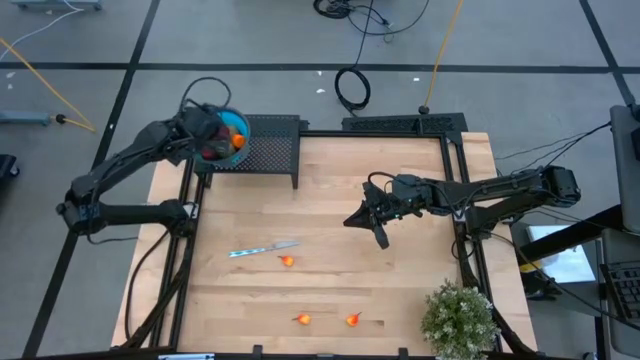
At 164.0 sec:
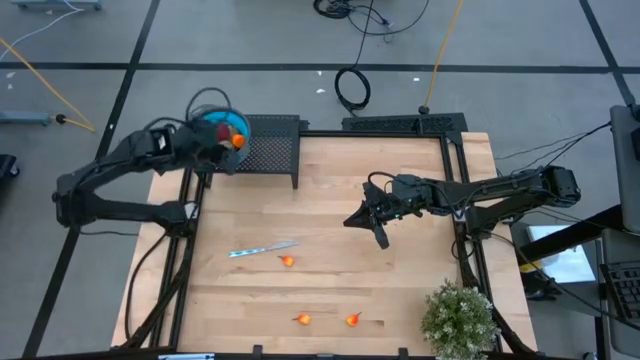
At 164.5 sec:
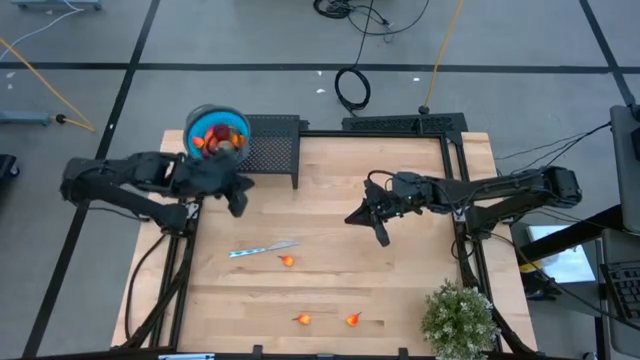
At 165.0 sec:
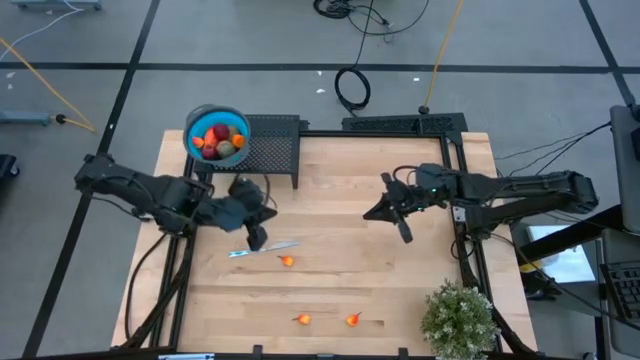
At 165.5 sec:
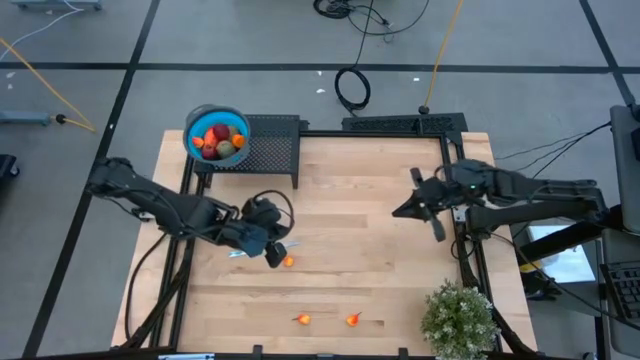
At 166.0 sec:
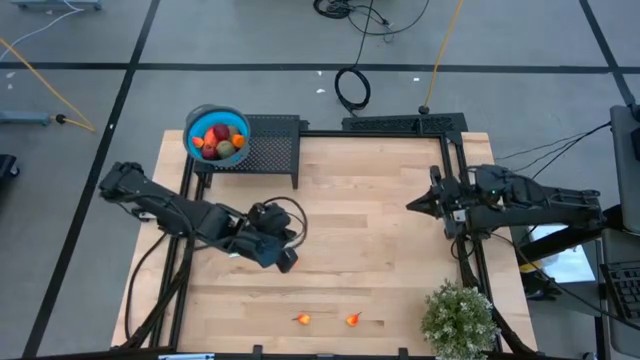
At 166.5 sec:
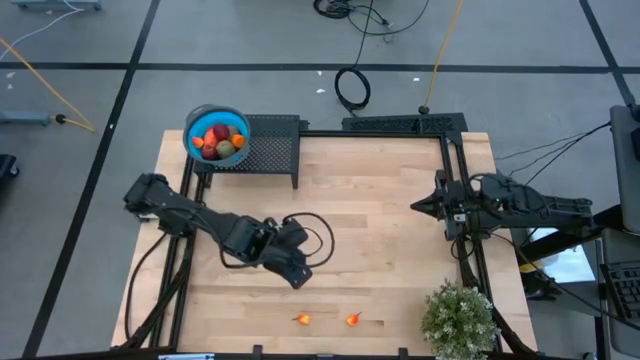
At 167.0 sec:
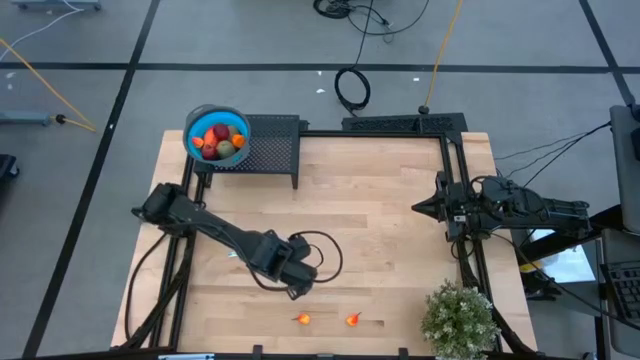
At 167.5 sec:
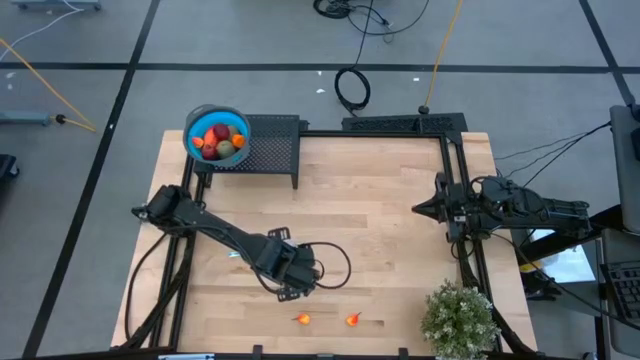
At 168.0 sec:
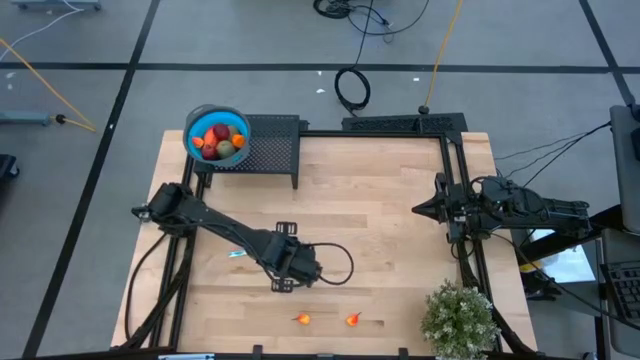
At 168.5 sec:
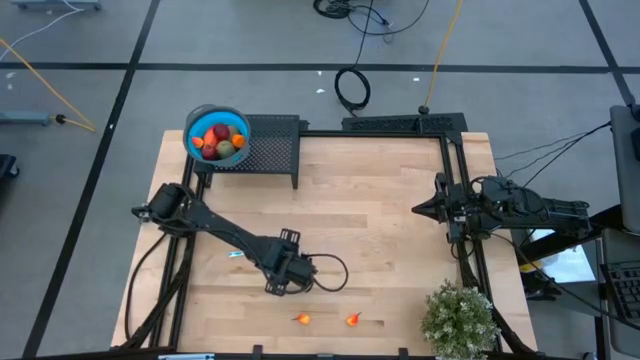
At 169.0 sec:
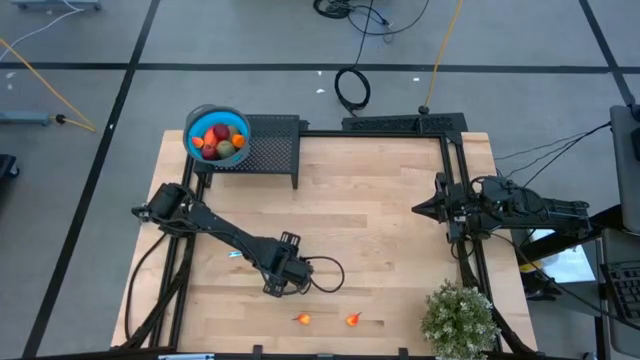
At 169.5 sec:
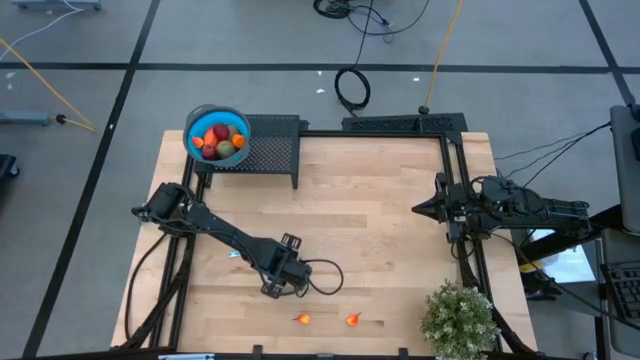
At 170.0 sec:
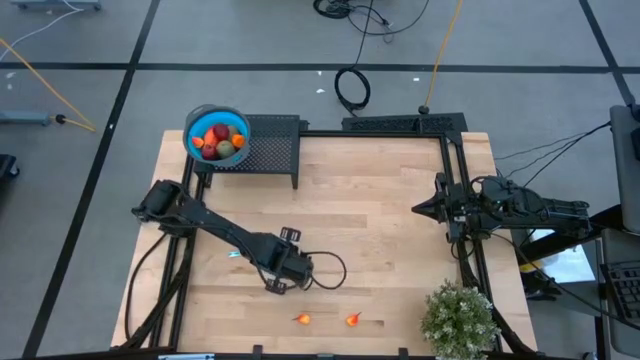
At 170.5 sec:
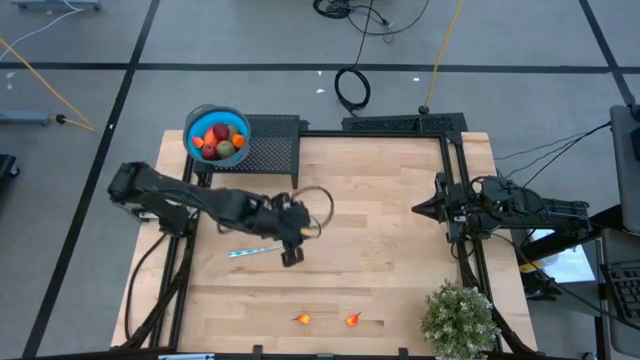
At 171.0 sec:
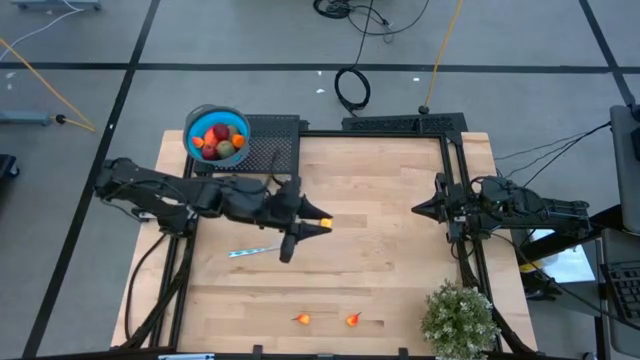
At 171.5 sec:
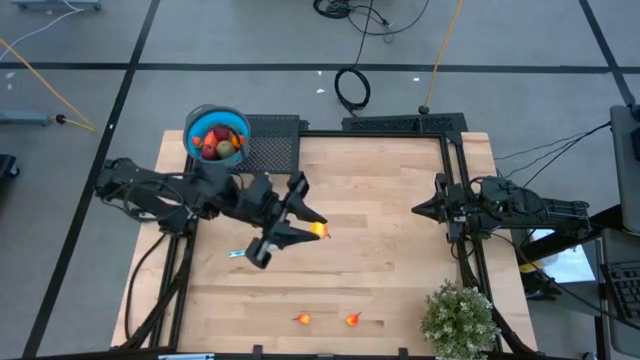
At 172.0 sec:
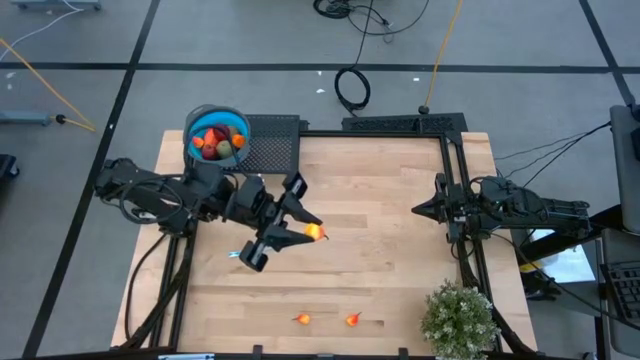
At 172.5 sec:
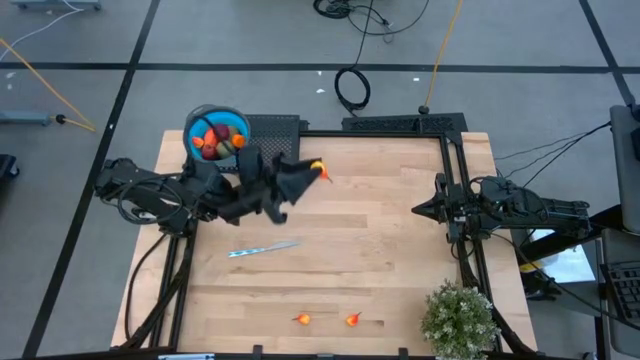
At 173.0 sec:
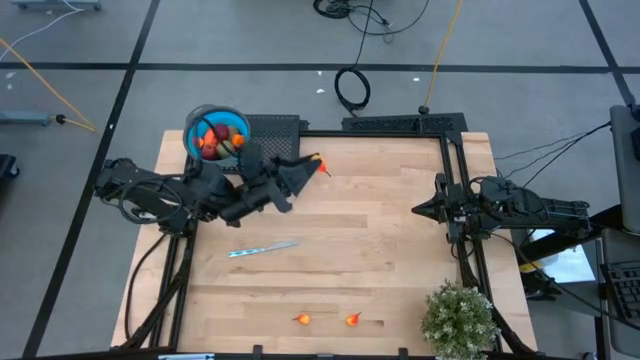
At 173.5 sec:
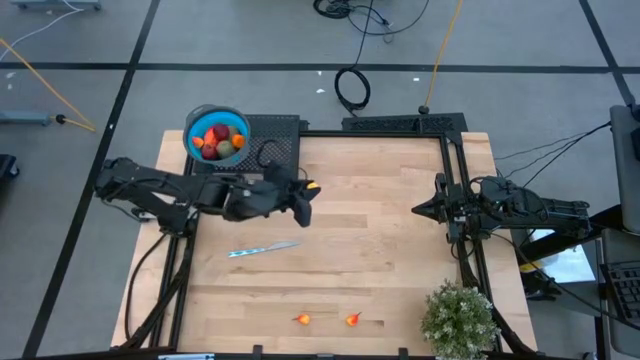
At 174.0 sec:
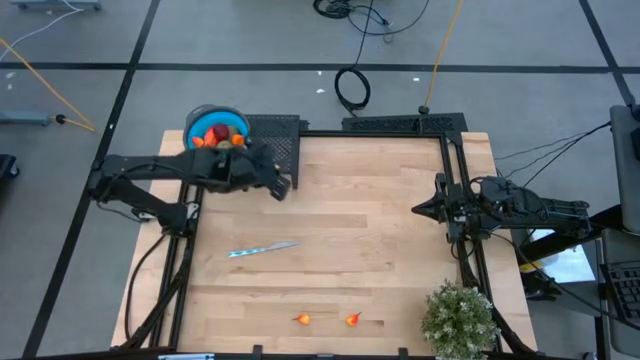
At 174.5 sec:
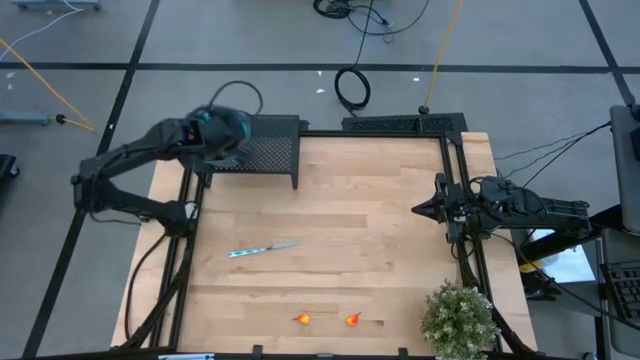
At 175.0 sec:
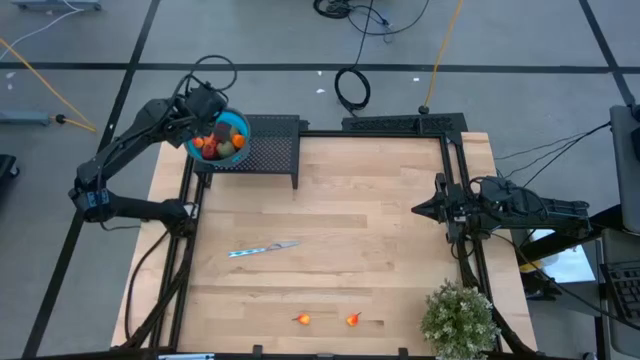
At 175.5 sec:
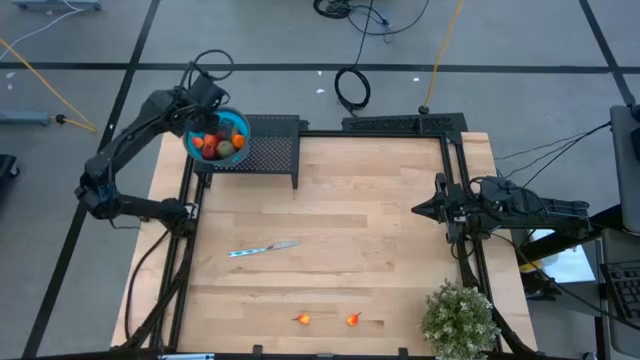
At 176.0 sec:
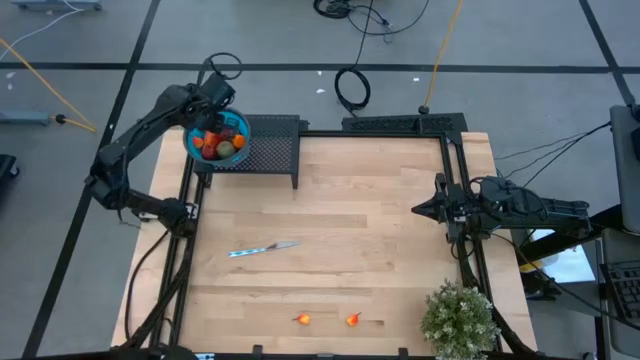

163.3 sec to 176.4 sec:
Task: Pick & Place Fruit
Put the peach into the blue strainer bowl on the shelf

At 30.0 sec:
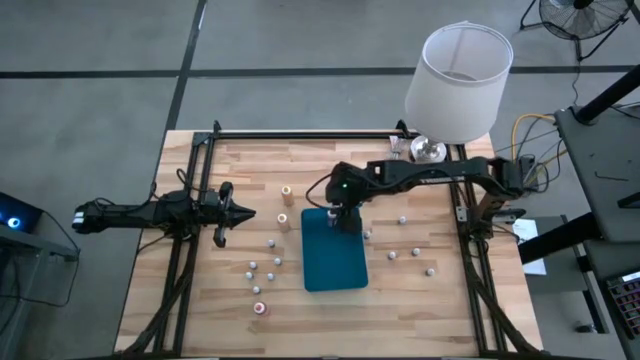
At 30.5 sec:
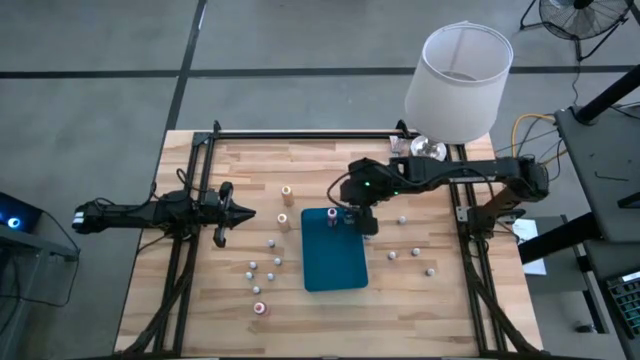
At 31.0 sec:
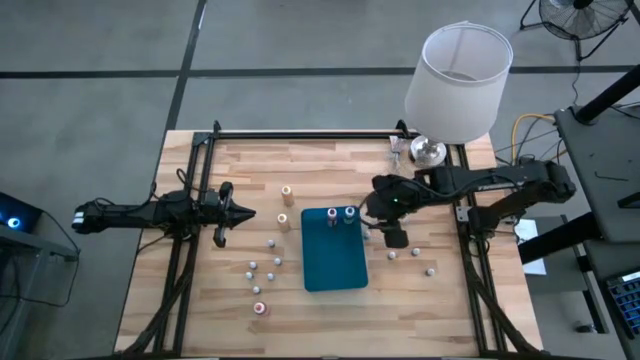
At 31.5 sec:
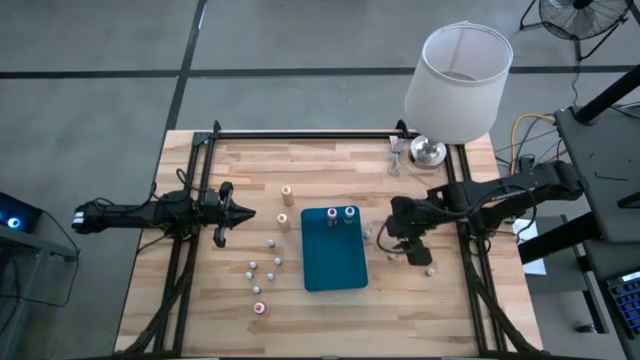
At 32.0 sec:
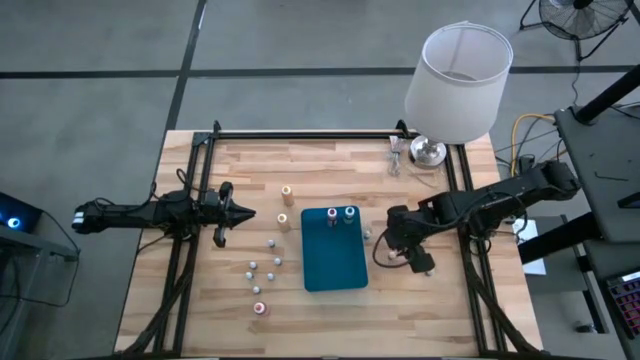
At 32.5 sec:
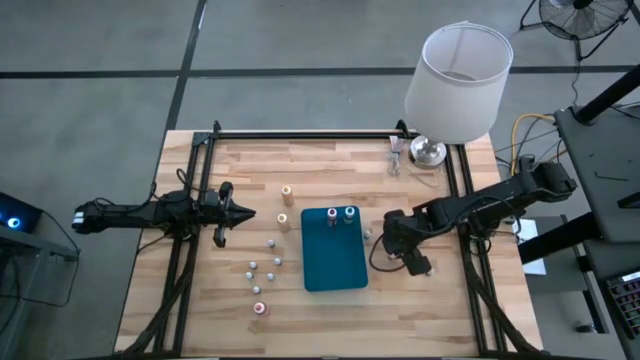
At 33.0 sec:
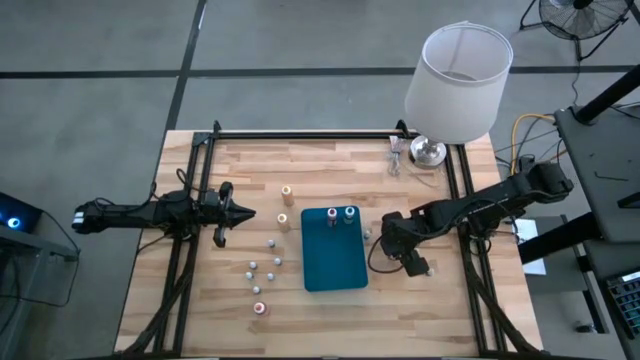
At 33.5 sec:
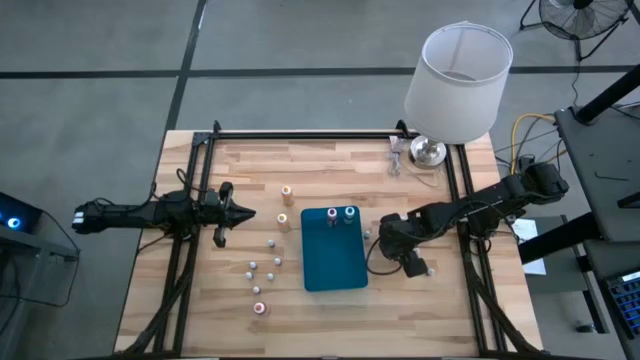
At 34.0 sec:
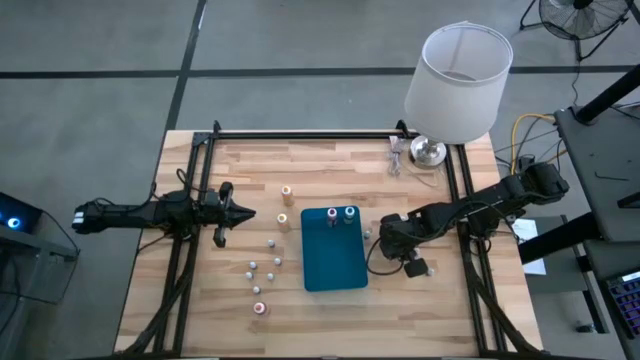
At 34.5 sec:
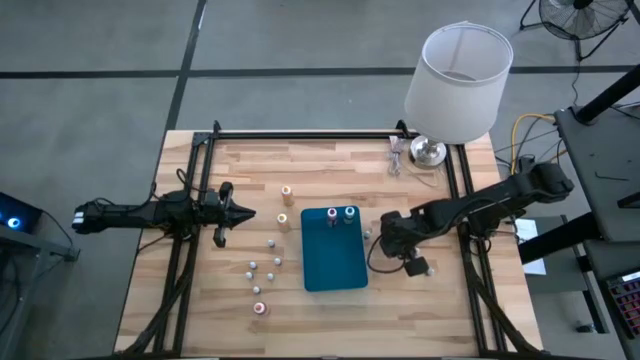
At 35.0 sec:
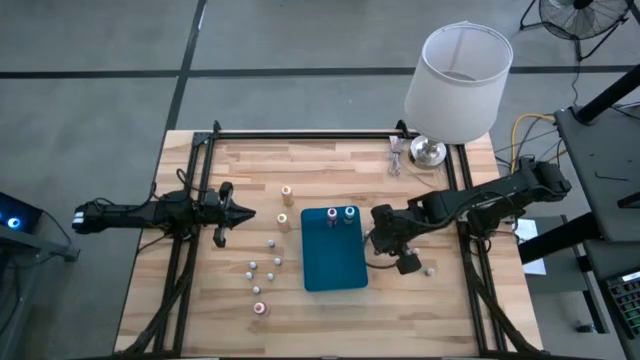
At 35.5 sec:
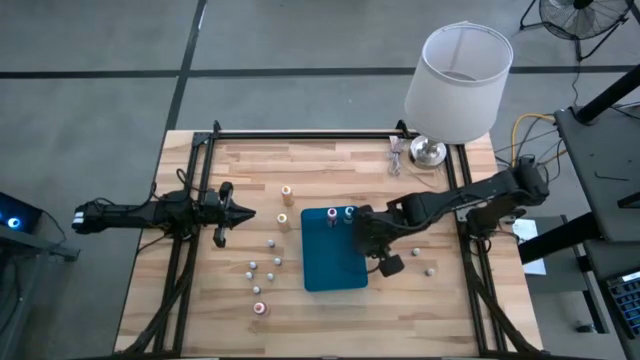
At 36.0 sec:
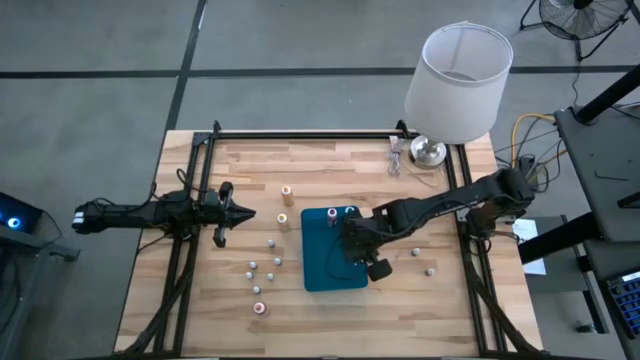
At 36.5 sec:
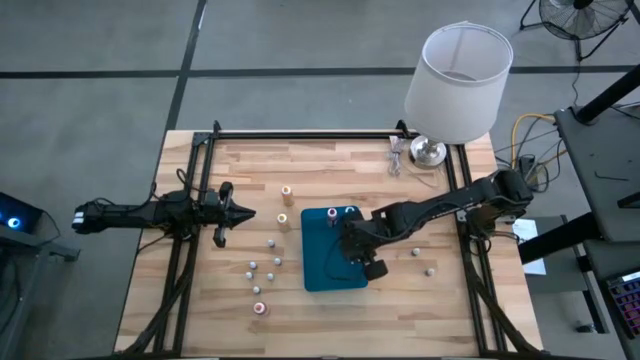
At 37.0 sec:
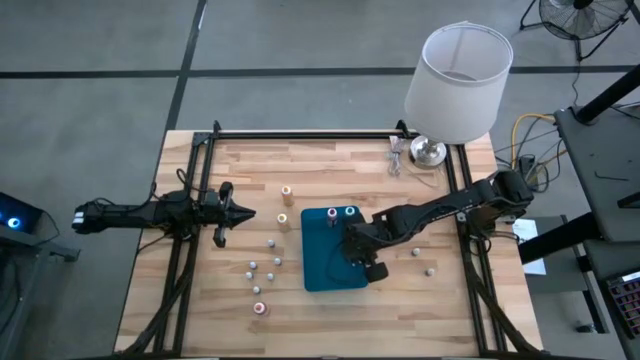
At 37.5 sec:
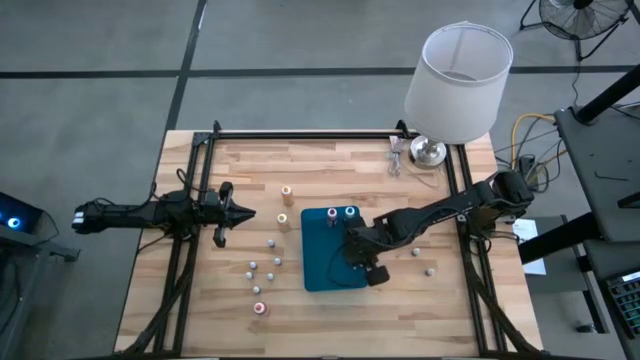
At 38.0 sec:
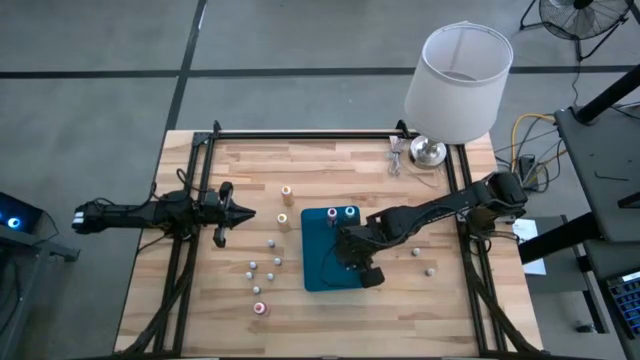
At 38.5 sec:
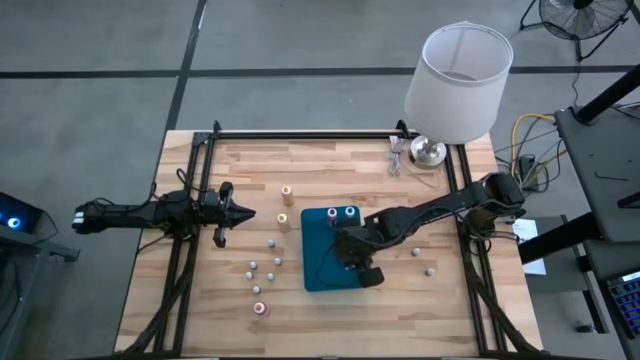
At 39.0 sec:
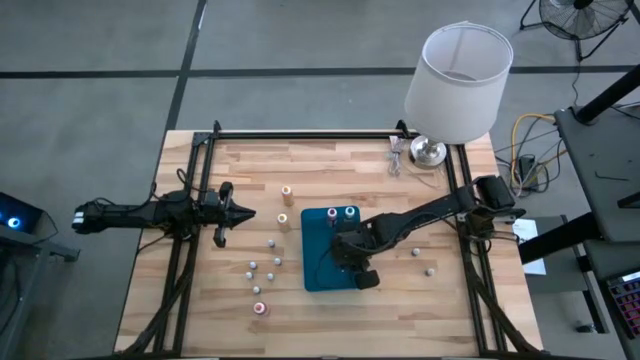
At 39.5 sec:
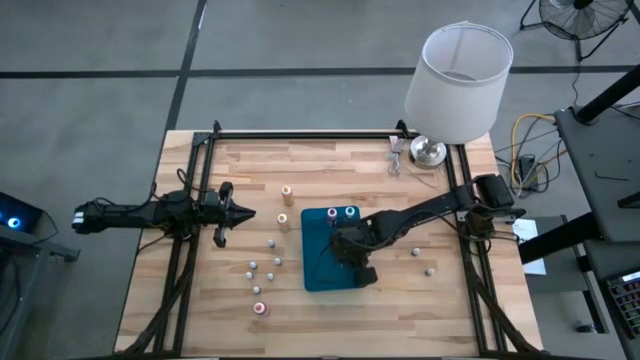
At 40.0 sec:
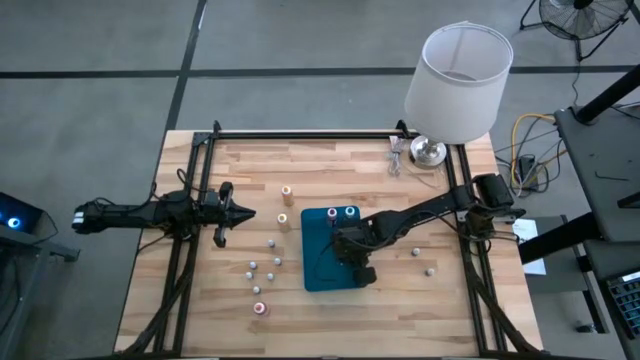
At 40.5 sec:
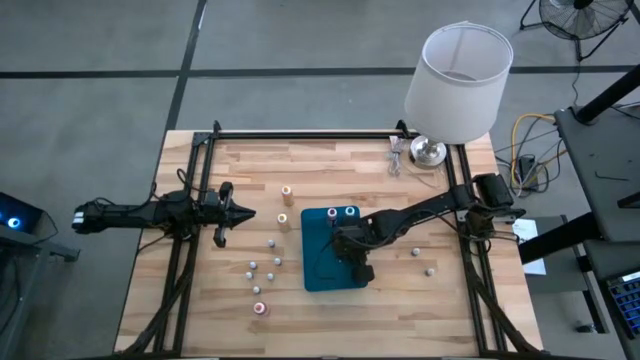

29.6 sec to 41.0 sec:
Task: Pick & Place food coloring
Put the small orange food coloring bottle into the blue bin
